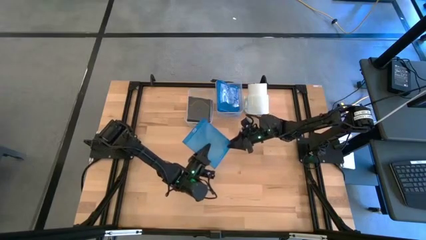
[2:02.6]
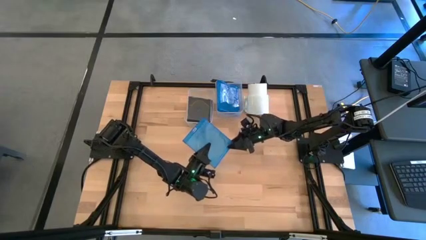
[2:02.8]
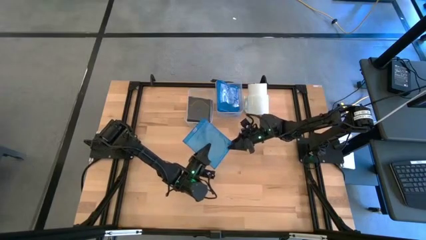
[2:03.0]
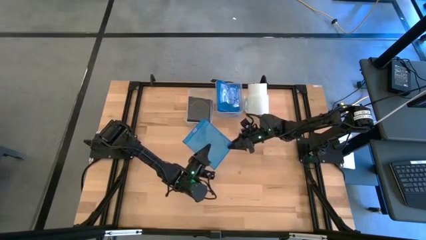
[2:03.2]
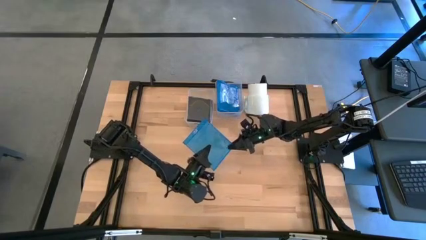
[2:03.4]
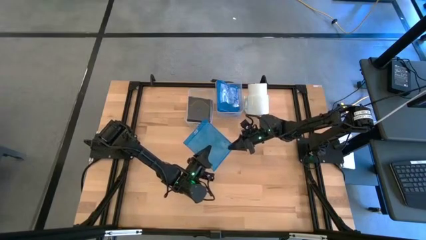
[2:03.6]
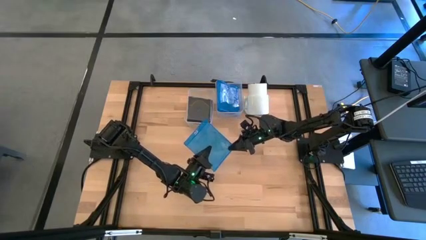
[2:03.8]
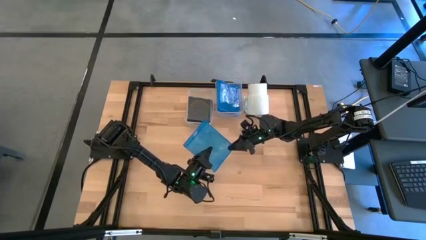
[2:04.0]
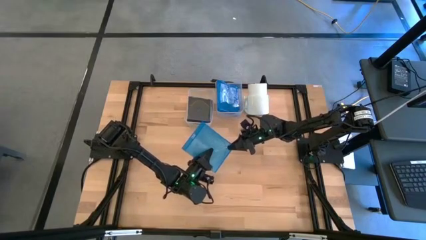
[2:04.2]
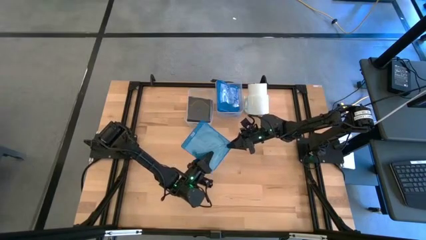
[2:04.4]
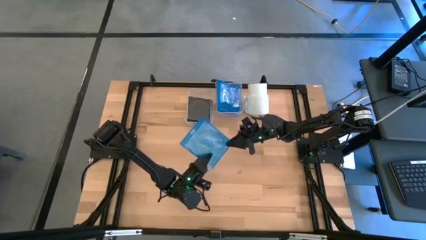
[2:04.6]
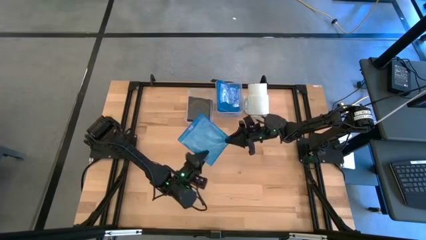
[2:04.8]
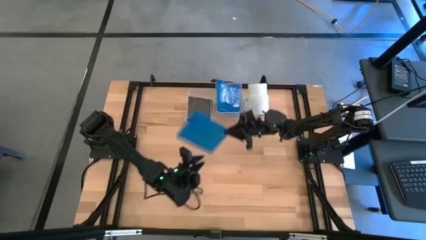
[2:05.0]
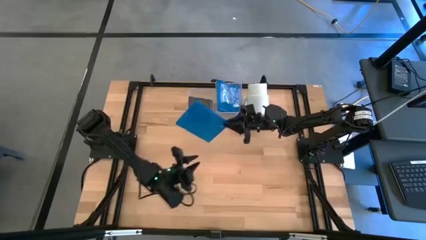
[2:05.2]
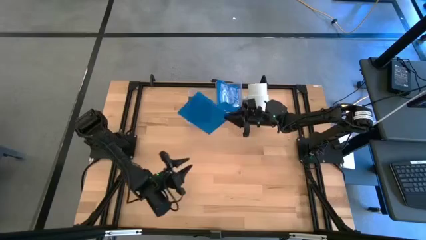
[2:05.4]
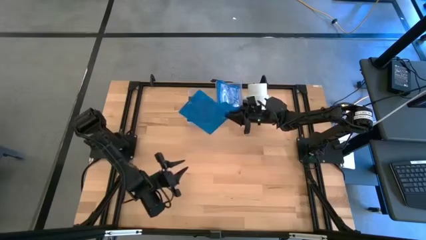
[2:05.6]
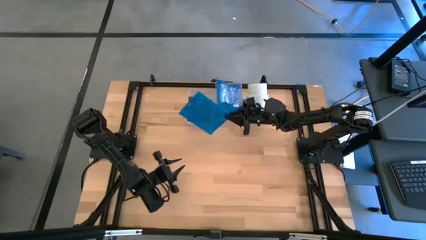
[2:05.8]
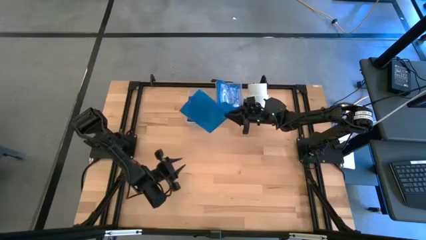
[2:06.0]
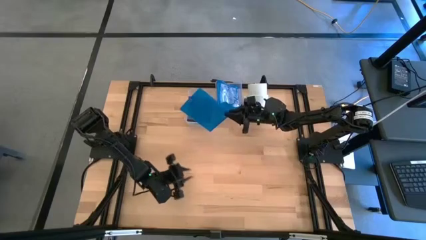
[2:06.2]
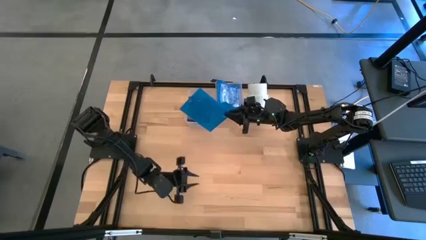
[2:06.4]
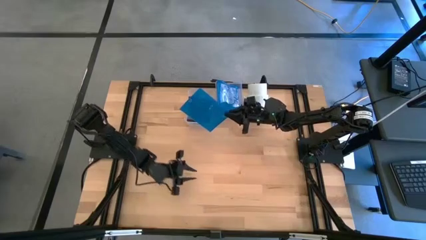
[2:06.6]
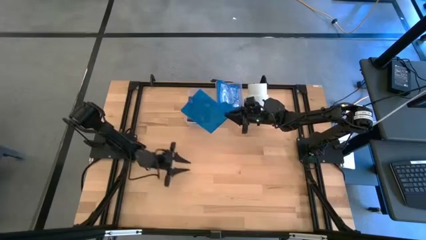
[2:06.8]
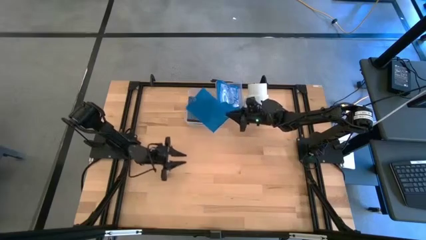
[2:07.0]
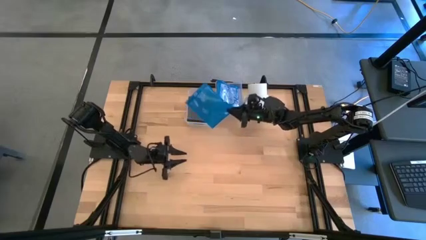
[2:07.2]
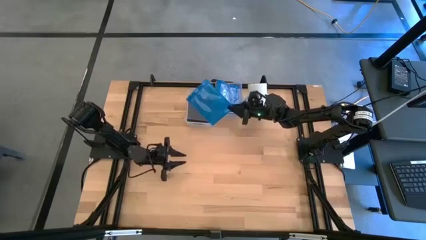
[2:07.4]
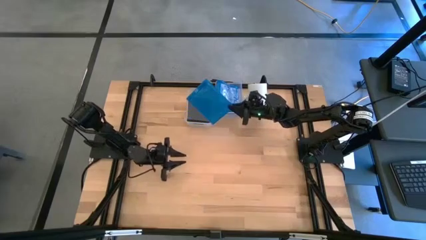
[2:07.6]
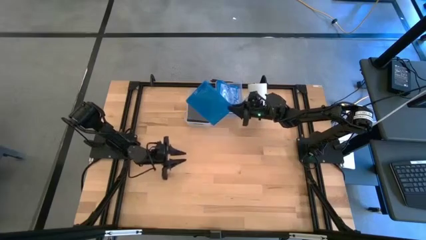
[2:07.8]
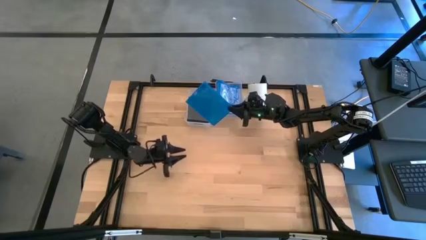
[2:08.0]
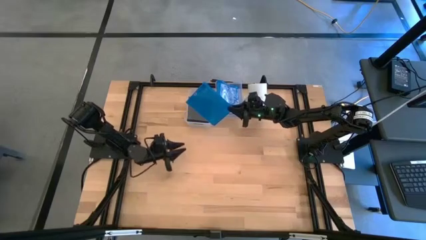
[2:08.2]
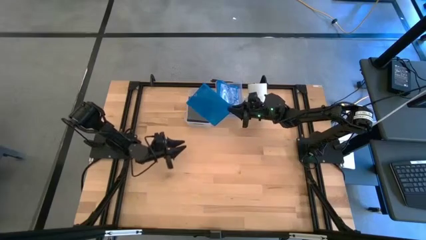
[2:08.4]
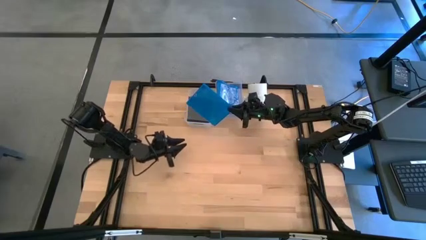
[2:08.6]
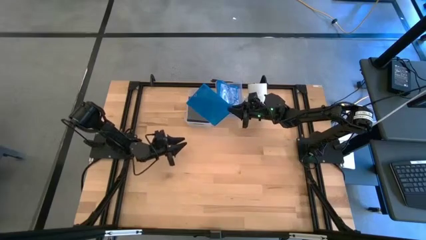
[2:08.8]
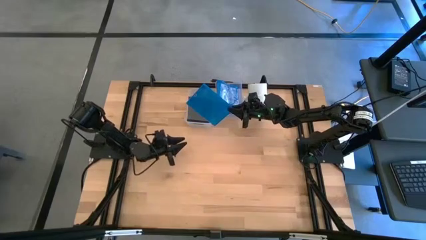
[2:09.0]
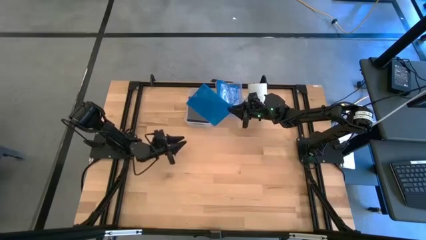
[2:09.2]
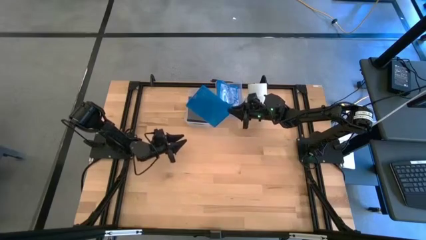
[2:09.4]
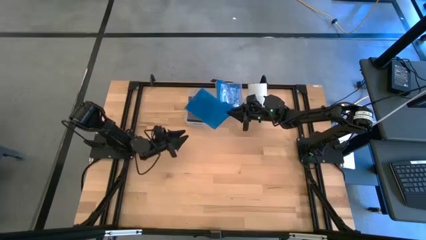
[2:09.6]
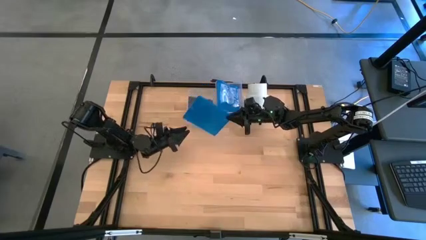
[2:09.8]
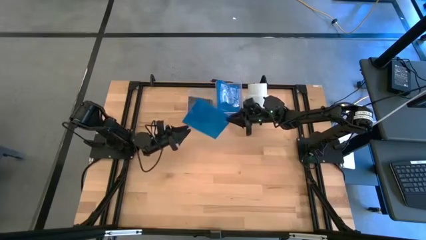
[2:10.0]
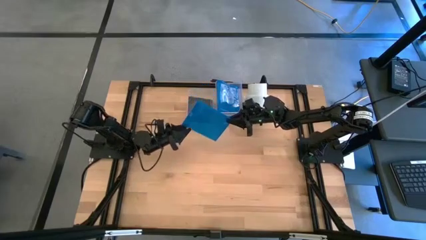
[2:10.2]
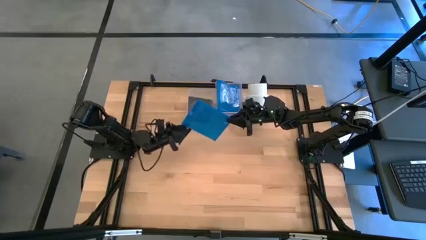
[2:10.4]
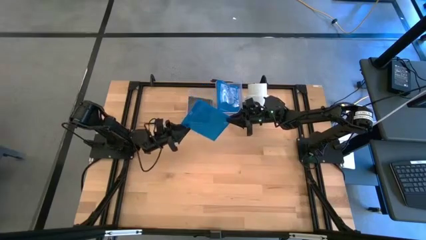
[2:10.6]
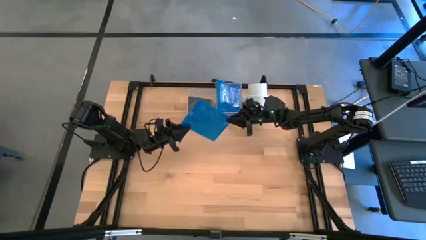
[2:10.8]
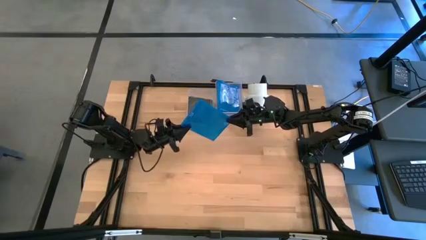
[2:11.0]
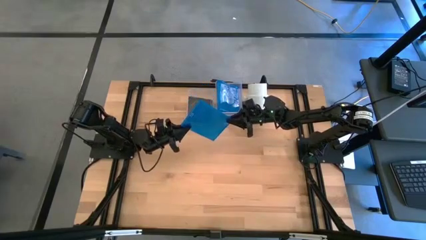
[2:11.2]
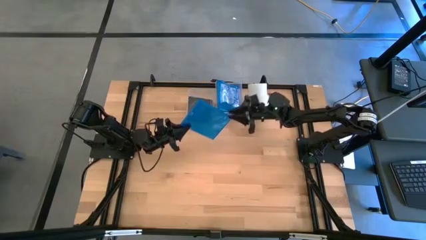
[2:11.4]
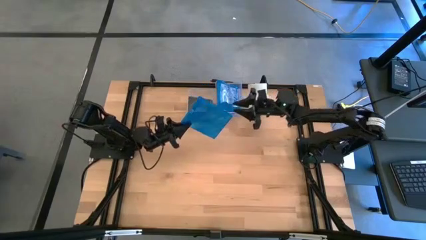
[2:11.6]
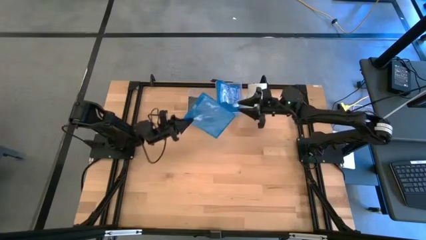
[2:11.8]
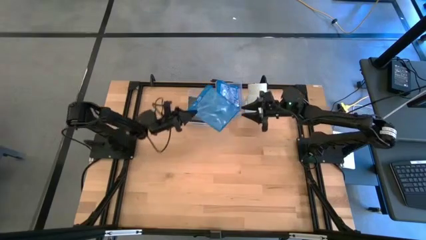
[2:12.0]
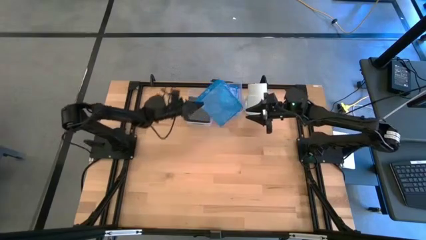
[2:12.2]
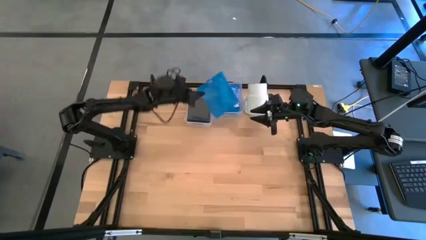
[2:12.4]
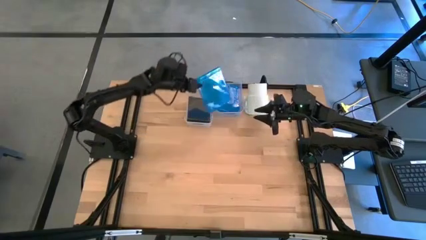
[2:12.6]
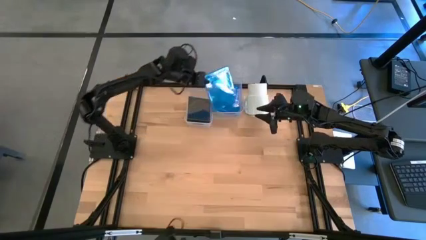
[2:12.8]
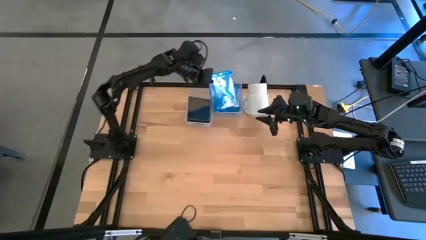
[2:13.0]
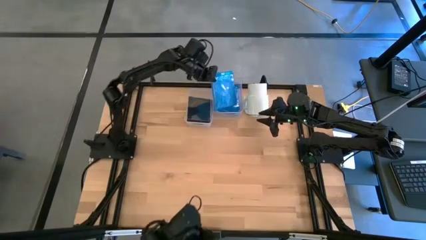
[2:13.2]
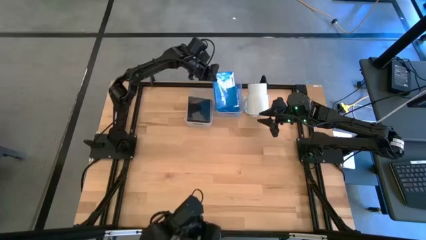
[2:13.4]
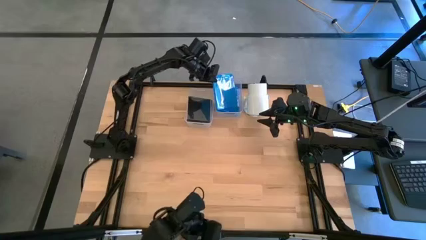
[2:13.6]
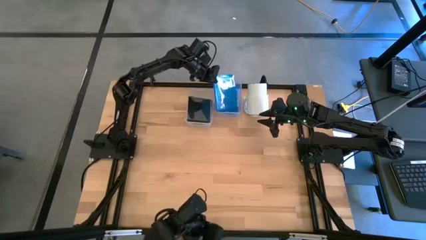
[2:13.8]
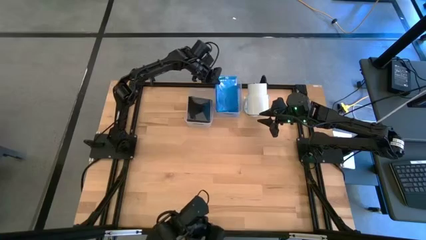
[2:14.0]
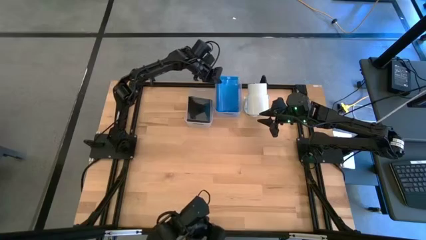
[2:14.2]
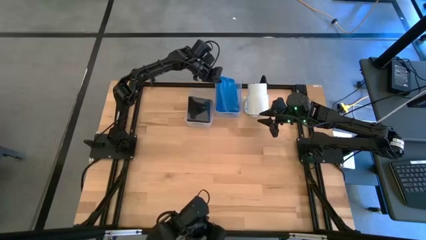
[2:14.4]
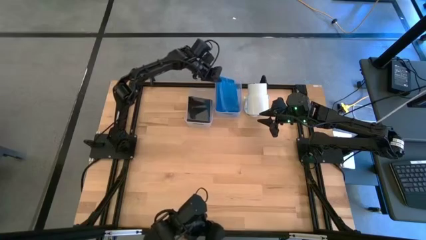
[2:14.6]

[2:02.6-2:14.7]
Task: Pick & place jewel cases by type
Put the blue CD Case into the right transparent bin

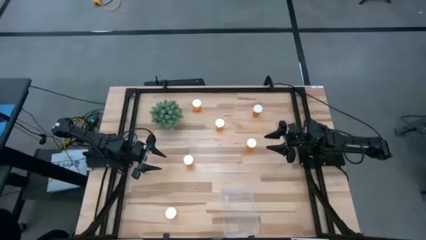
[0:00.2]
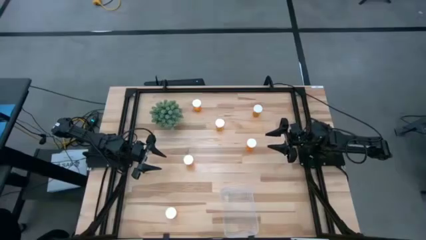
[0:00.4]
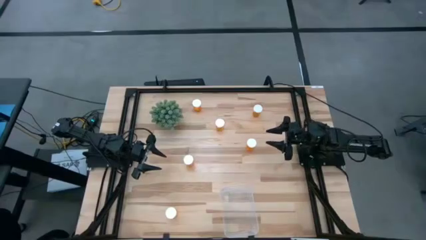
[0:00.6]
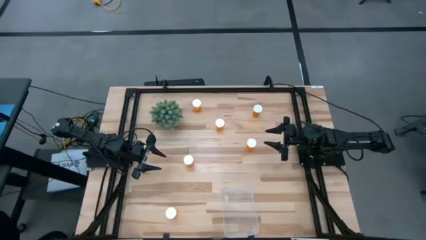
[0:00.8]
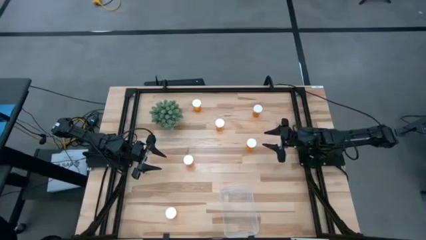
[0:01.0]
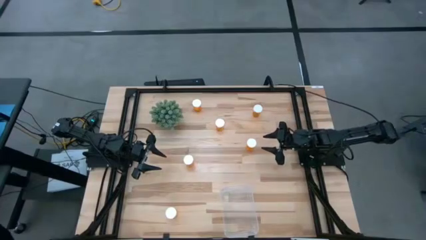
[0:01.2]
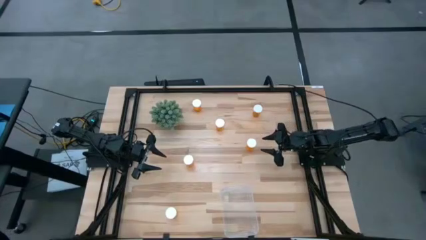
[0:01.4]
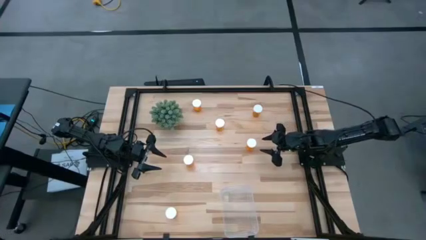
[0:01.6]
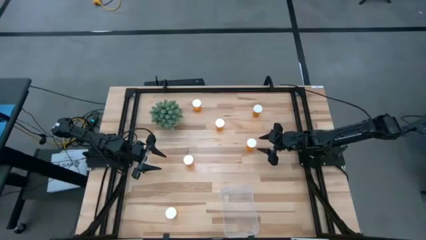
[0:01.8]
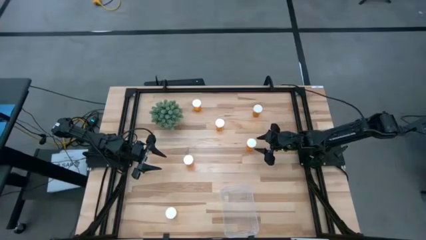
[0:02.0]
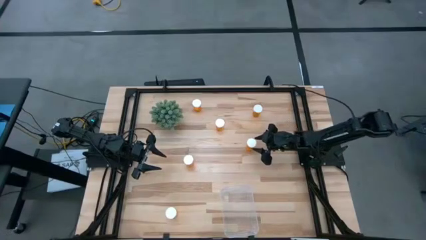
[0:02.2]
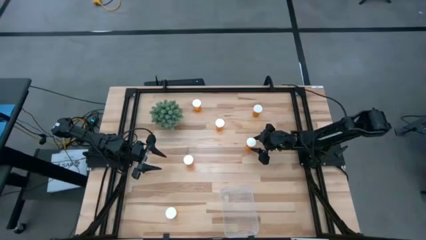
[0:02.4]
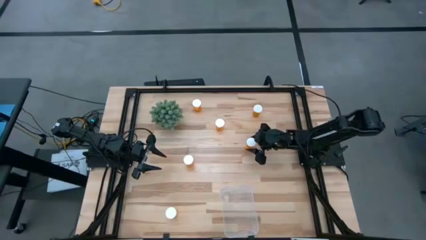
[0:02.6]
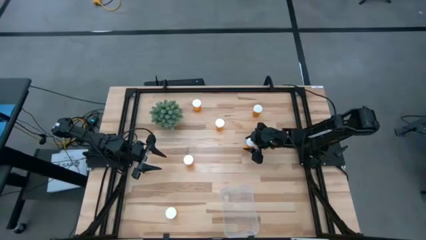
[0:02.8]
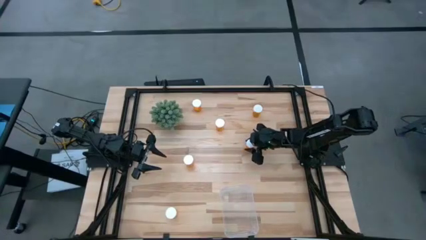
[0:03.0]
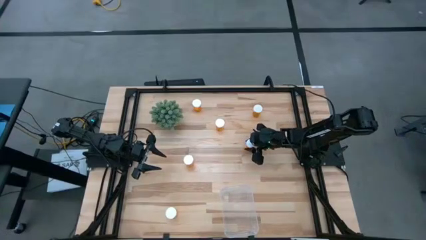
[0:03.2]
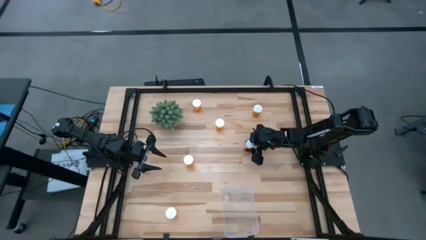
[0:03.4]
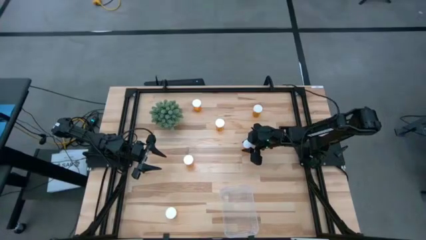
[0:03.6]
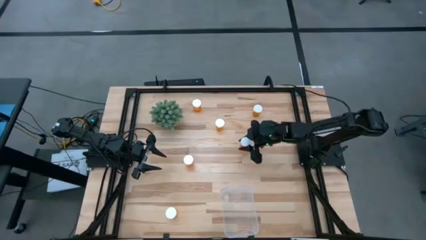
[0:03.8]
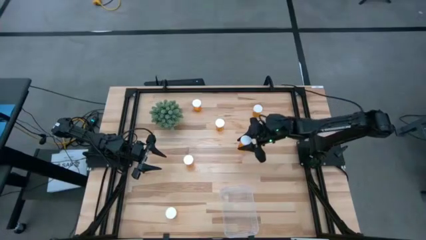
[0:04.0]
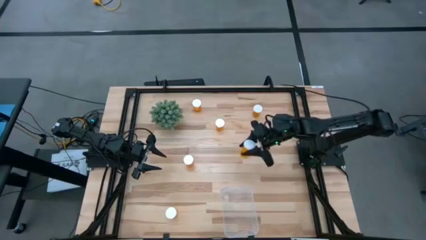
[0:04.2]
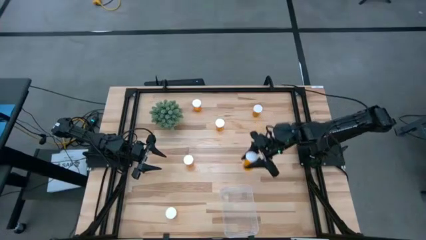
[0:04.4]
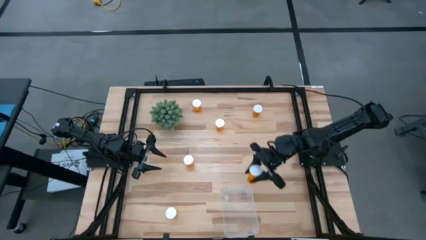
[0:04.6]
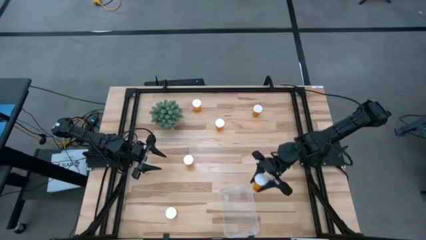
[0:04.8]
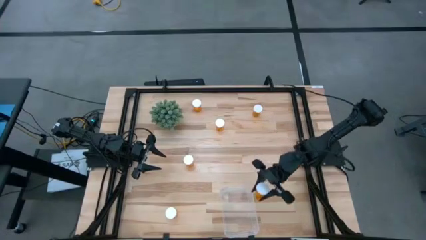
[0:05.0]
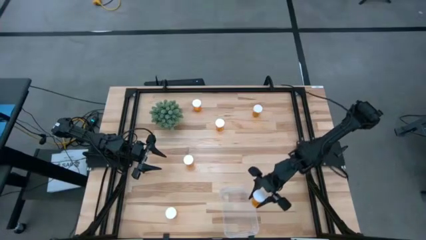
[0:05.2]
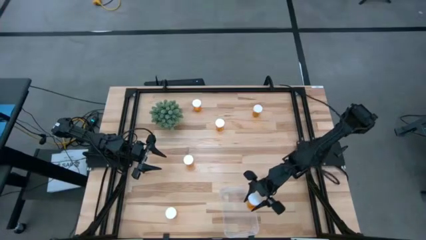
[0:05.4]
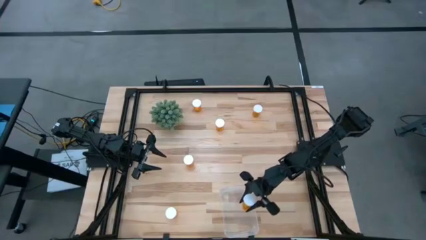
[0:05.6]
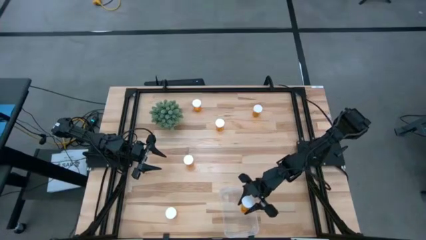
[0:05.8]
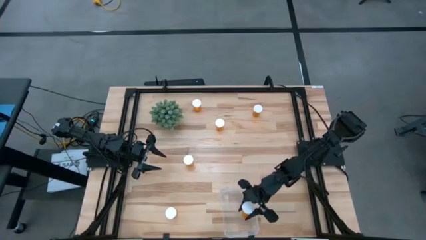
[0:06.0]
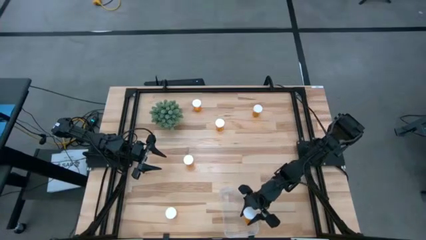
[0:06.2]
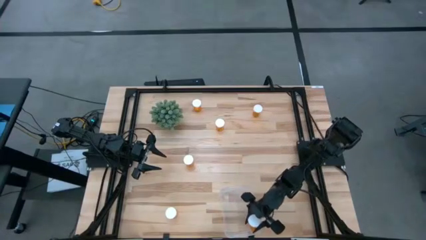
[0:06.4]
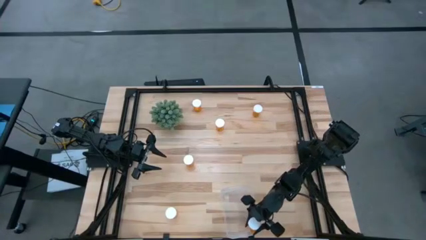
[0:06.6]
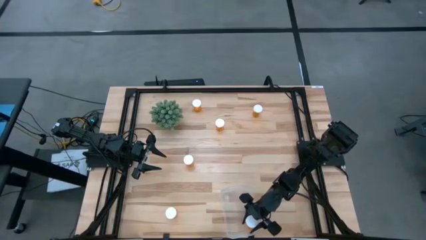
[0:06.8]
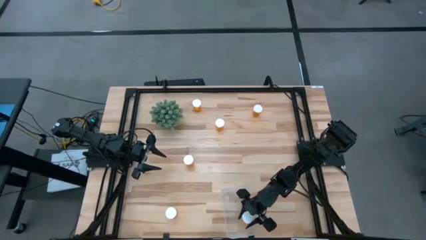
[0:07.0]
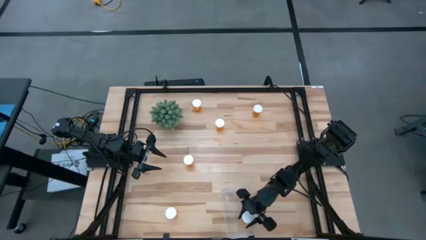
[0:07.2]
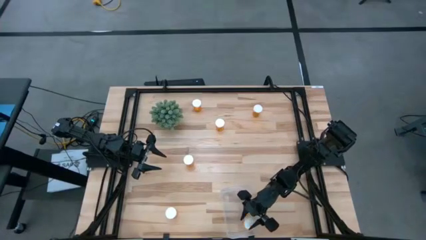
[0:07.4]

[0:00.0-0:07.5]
Task: Pick and place pill bottles into a basket
Put the orange pill bottle into the transparent bin
